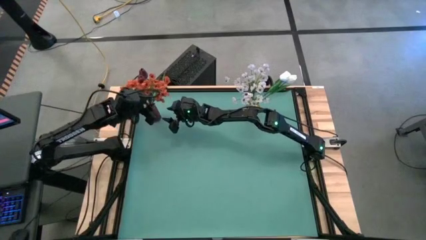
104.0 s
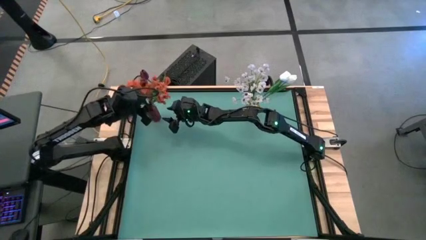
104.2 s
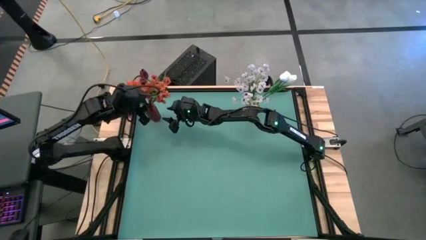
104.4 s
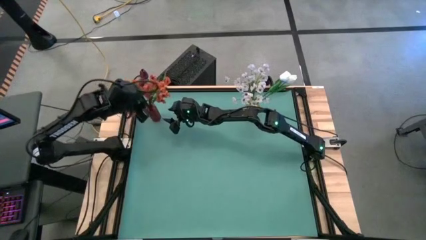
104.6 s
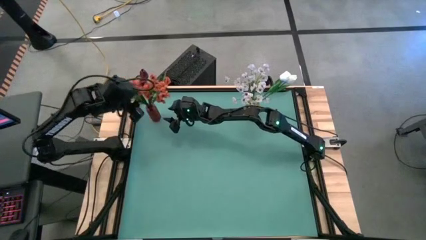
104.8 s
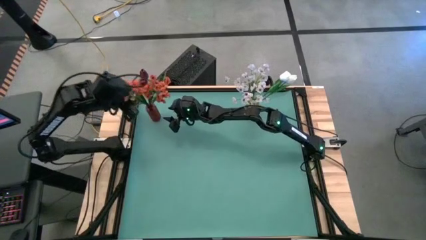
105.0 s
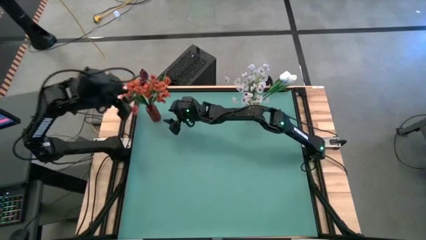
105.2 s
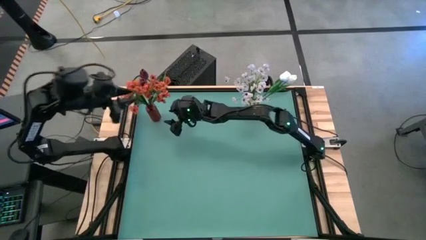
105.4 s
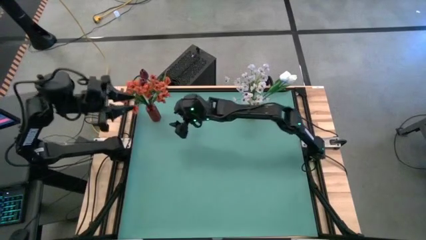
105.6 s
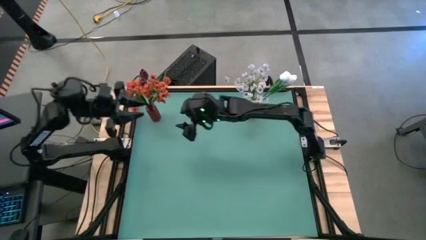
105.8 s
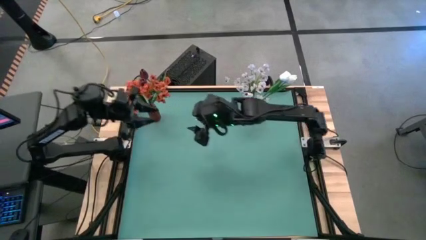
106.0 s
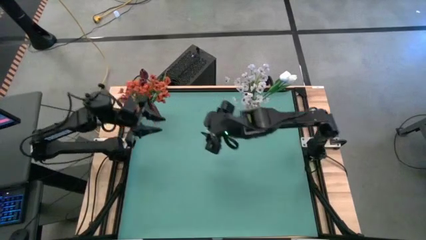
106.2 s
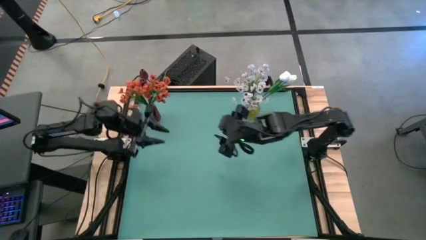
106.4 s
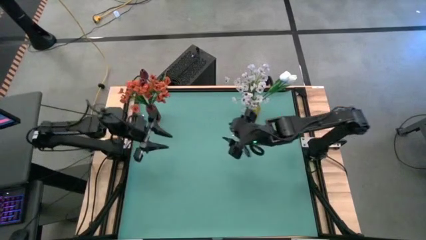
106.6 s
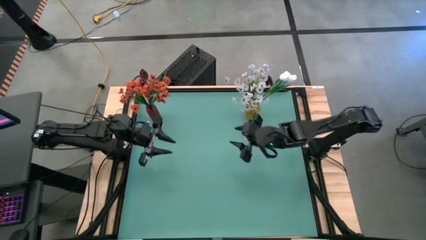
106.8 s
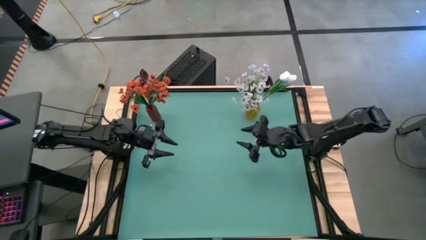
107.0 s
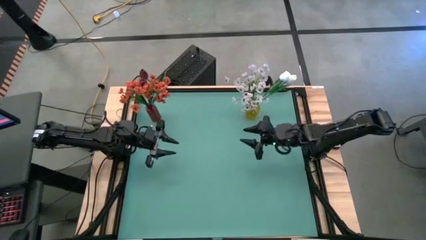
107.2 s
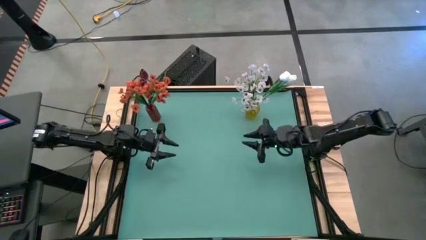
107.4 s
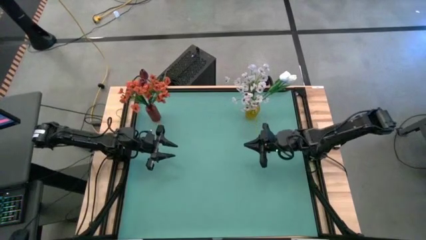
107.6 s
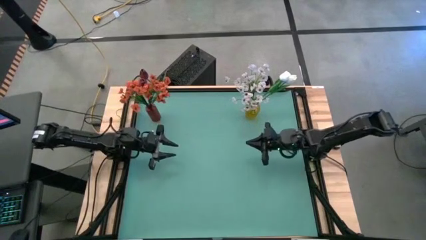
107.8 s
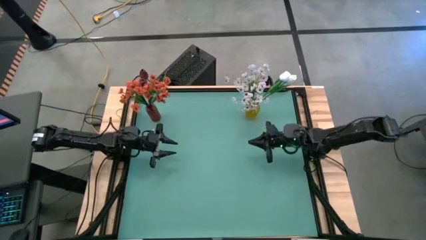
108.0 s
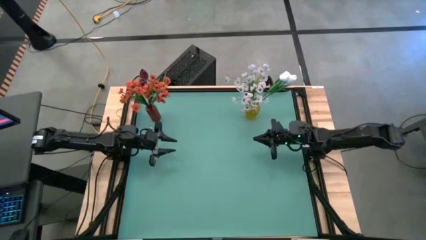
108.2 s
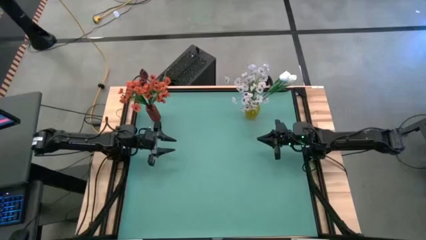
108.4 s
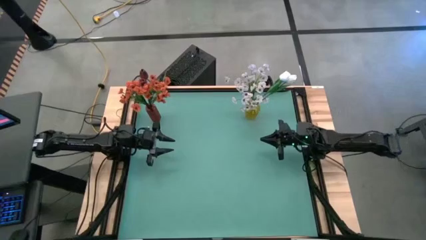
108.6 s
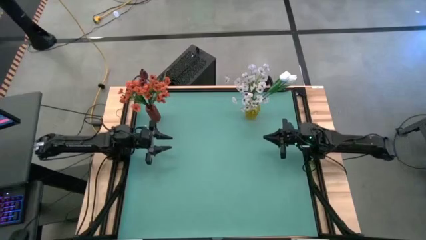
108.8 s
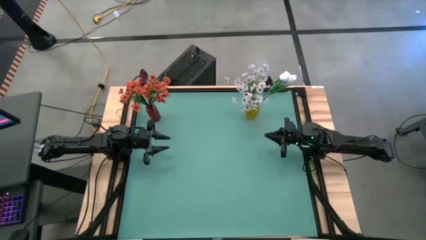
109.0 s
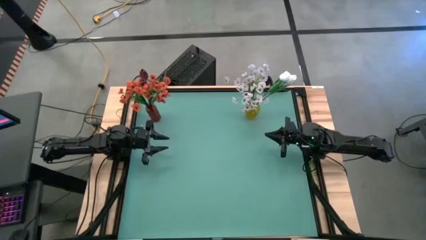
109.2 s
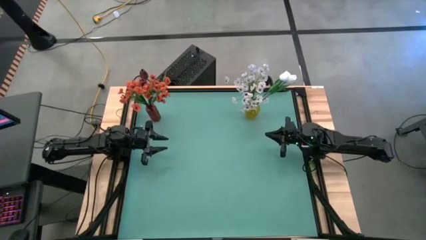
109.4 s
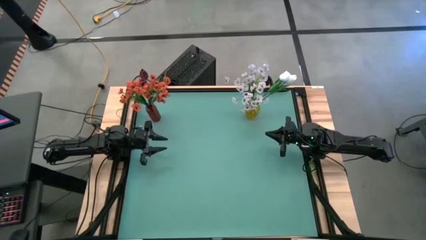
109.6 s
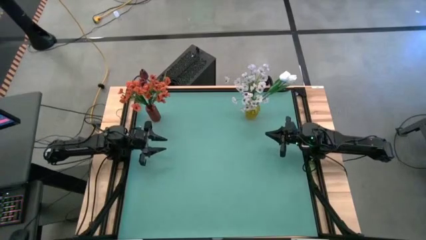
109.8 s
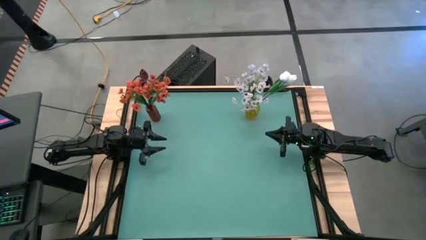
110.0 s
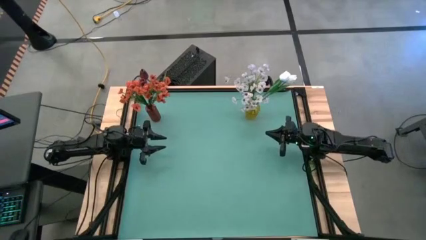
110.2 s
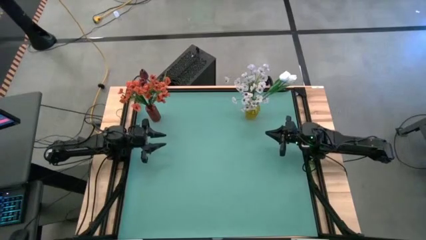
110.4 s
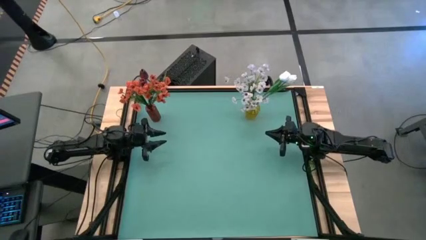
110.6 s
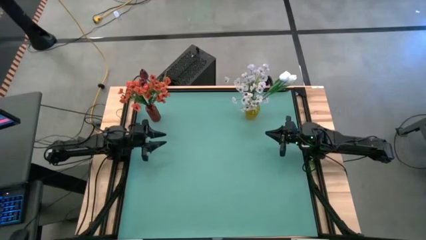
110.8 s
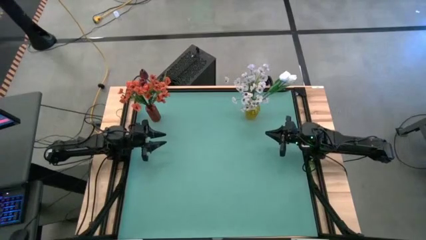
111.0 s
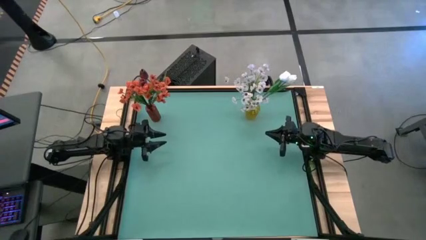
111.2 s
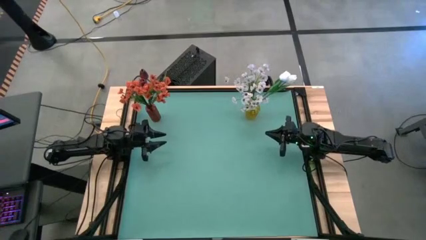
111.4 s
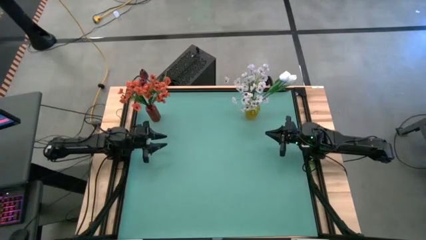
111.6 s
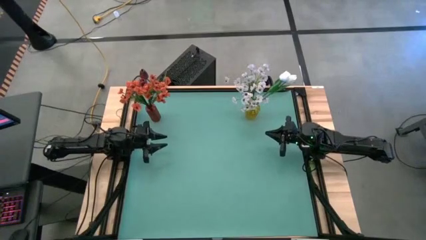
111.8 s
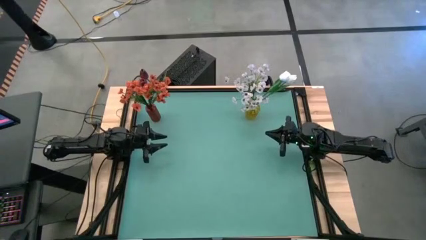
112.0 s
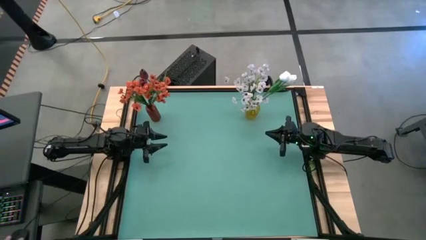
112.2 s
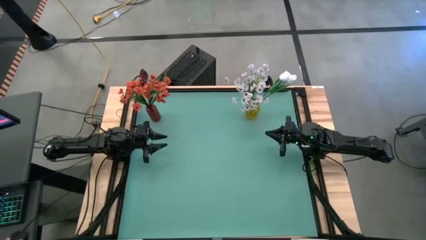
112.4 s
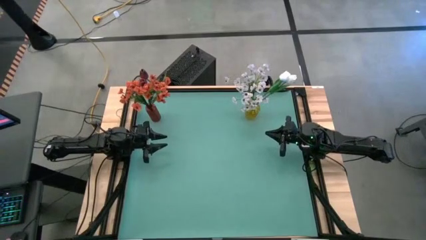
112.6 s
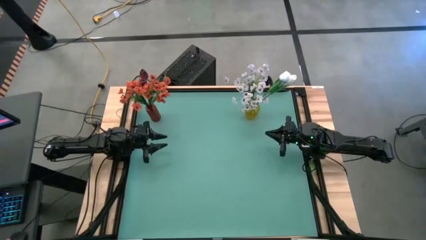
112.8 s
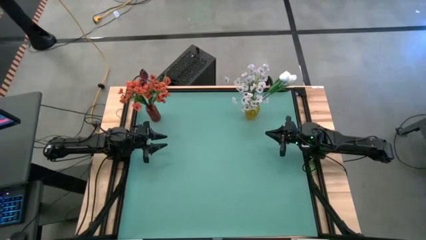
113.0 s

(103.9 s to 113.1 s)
Task: Sort flowers into vase by color
Return to Home Position

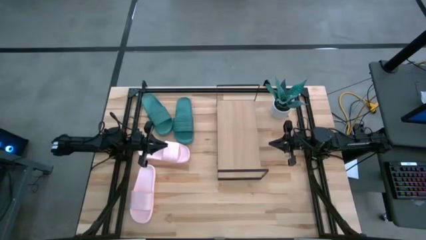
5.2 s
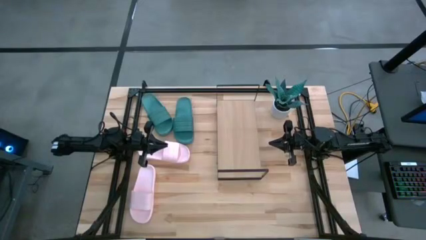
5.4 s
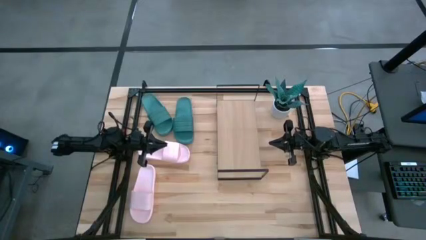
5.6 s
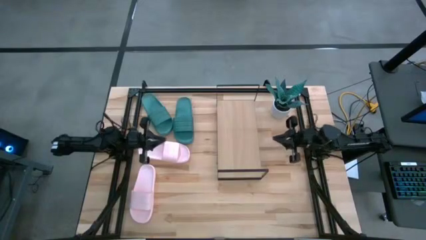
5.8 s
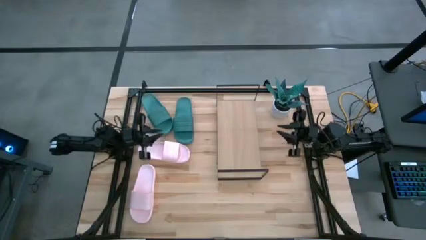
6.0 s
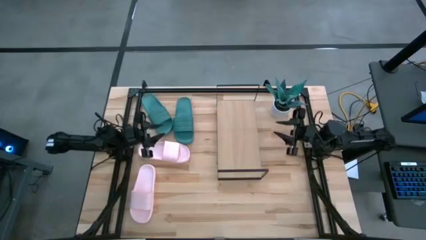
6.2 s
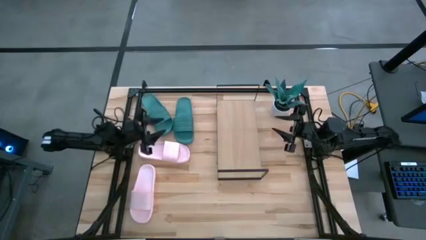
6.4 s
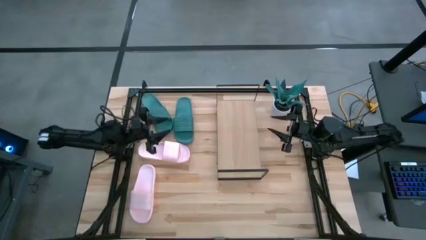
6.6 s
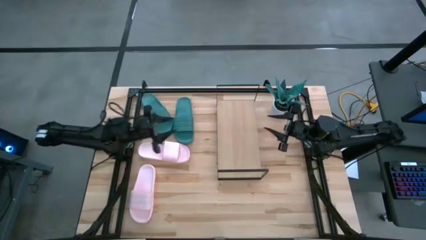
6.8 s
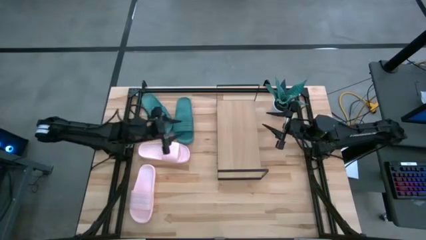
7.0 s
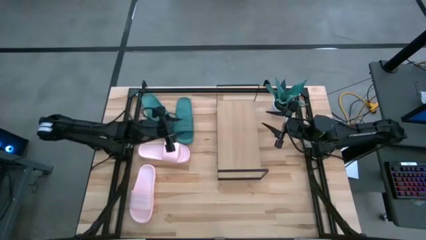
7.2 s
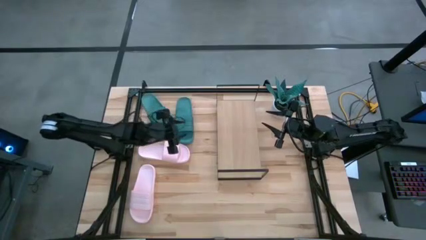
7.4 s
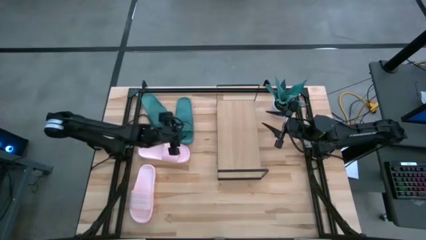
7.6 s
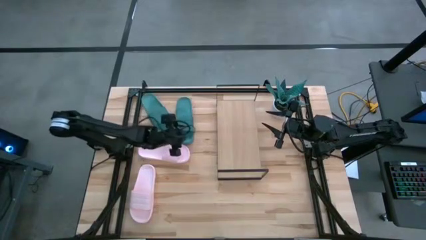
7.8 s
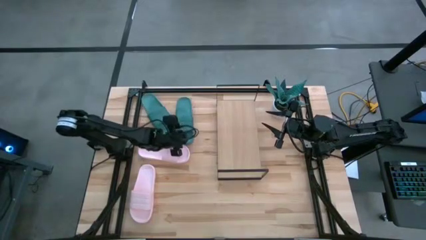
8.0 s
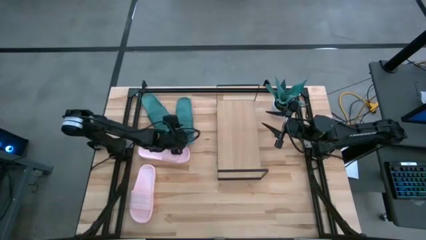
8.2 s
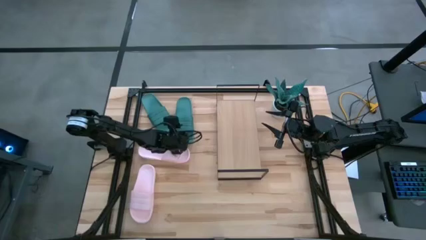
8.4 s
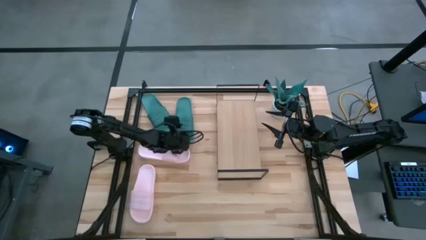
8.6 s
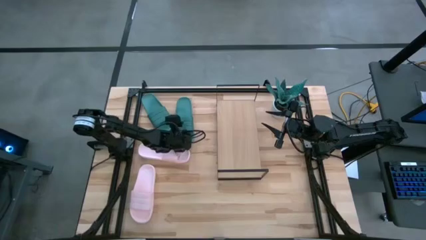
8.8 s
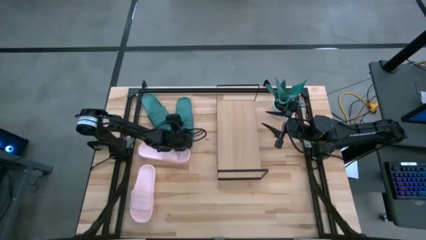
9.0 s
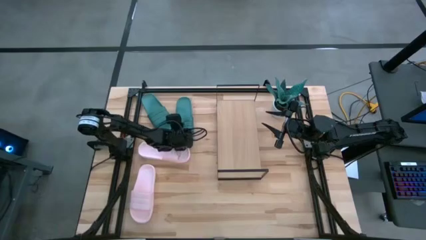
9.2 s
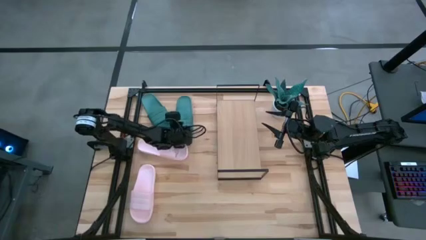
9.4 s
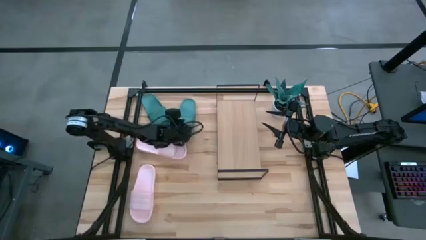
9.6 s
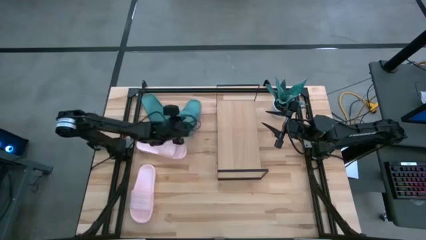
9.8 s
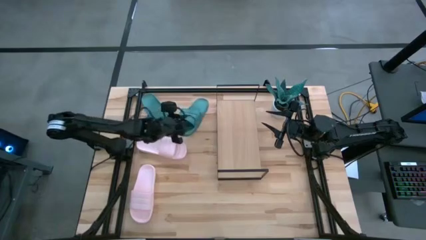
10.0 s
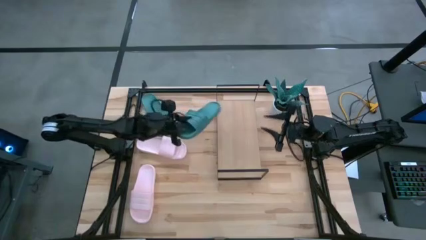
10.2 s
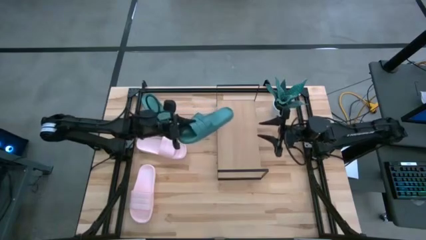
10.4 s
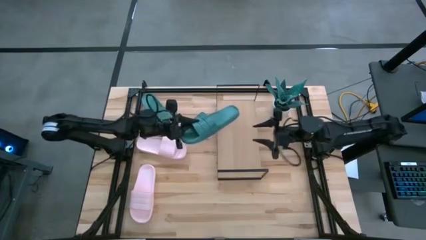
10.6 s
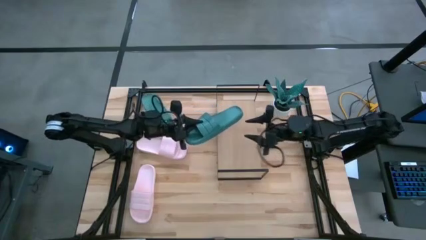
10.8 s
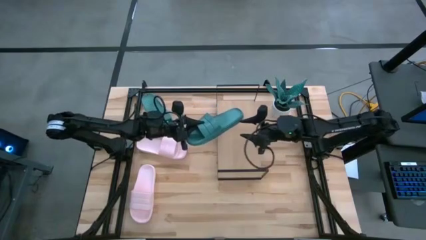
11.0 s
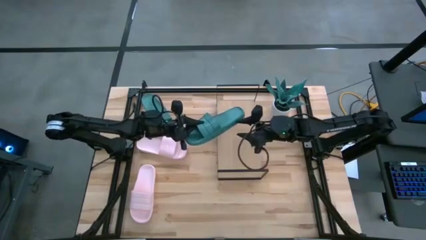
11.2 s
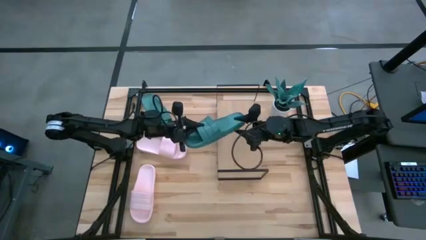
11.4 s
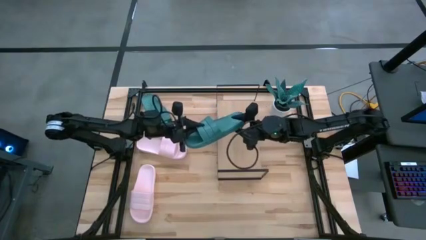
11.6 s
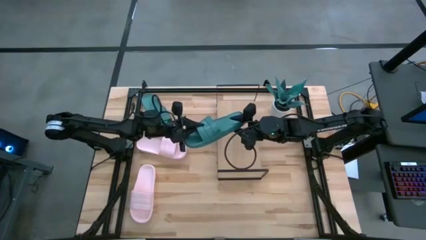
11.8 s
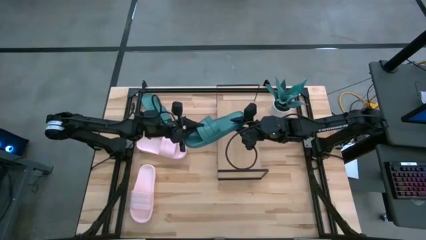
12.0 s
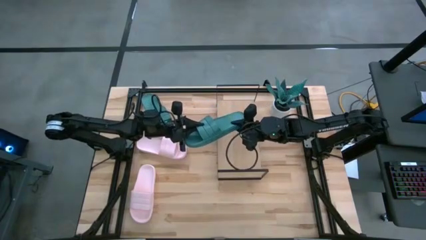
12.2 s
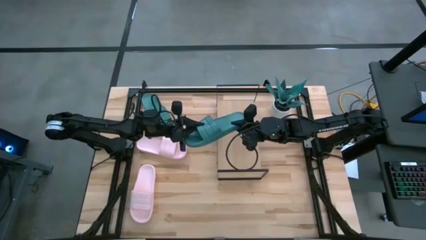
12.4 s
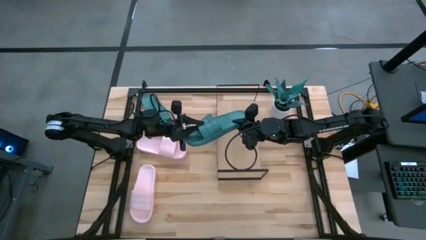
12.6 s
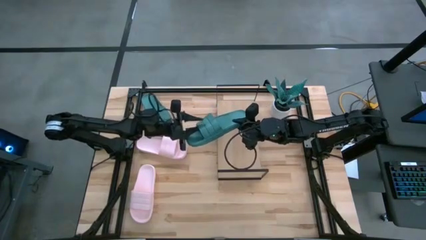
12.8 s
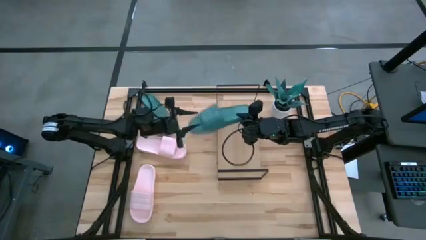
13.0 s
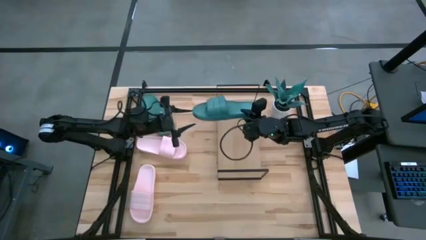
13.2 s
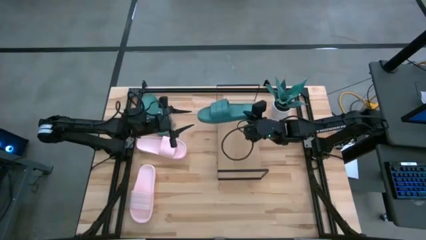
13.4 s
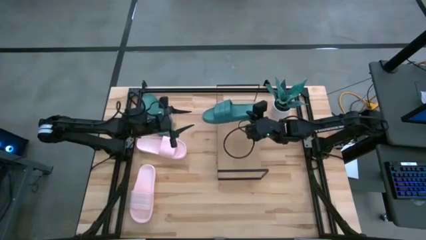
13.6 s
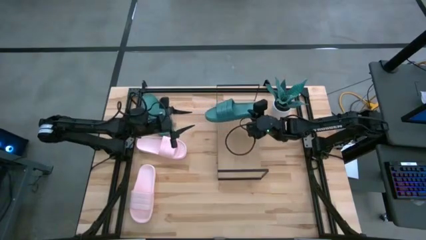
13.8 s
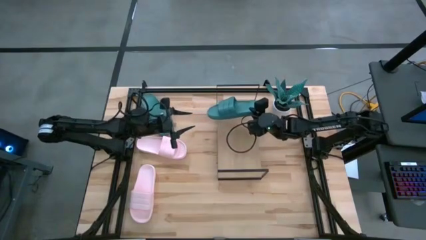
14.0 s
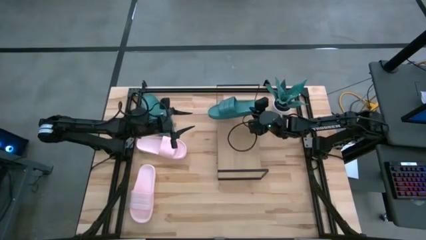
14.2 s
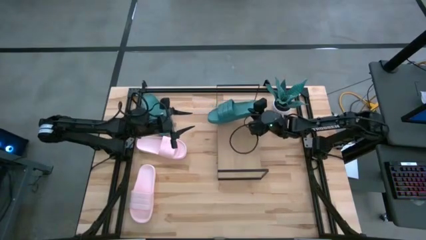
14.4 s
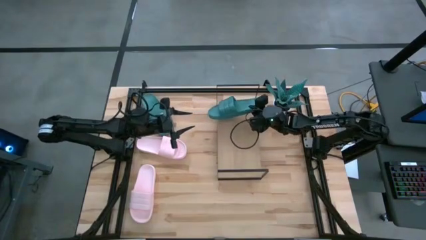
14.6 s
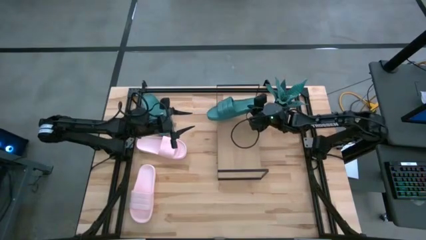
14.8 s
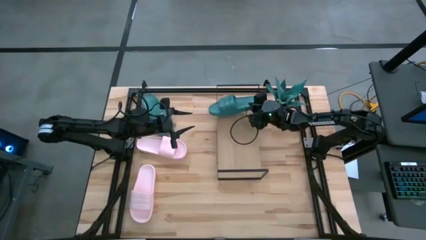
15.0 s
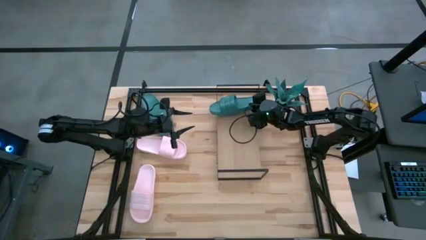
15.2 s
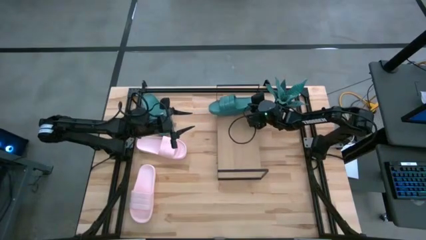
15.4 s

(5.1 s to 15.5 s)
Task: Pick and place slides into the shelf
Put the right blue slide on the shelf
